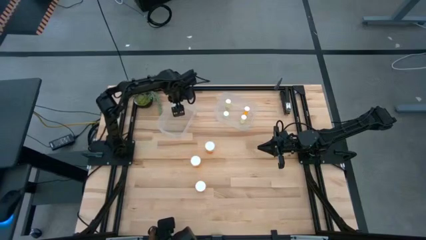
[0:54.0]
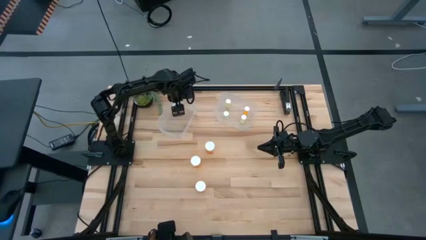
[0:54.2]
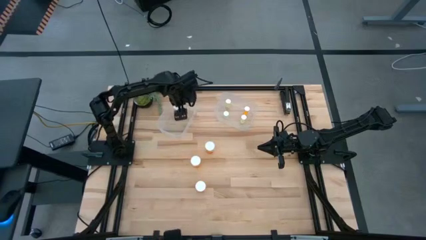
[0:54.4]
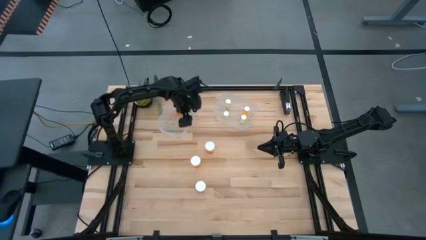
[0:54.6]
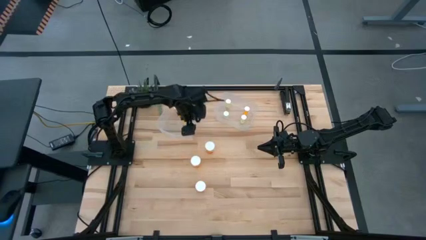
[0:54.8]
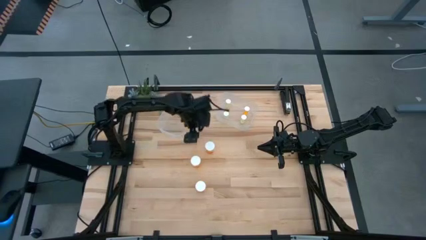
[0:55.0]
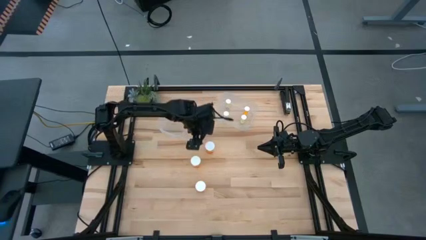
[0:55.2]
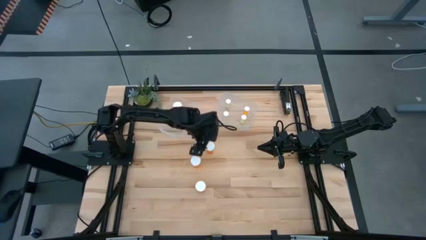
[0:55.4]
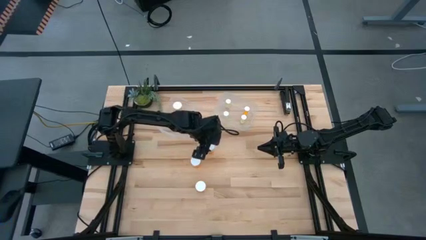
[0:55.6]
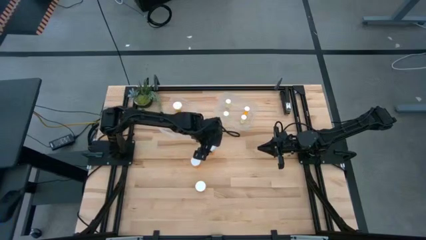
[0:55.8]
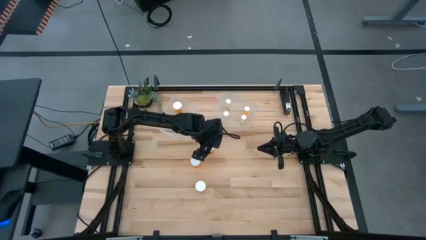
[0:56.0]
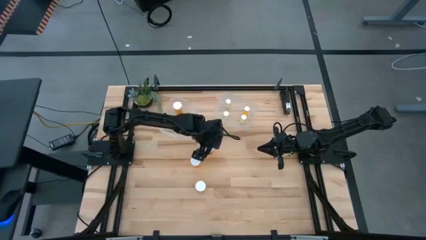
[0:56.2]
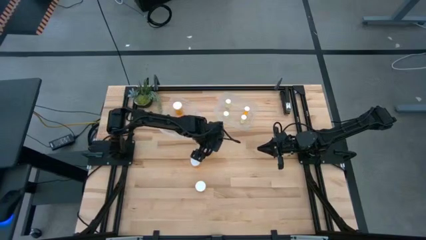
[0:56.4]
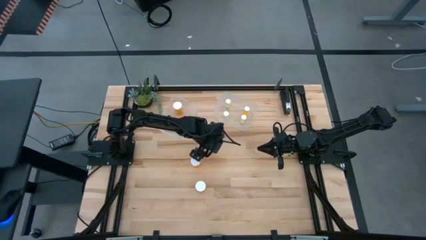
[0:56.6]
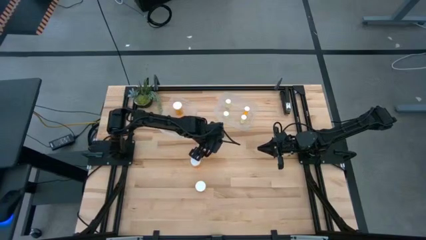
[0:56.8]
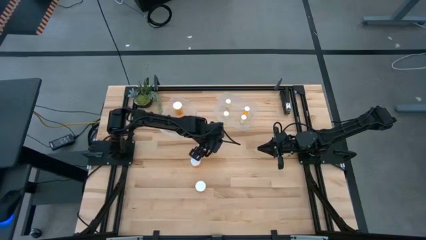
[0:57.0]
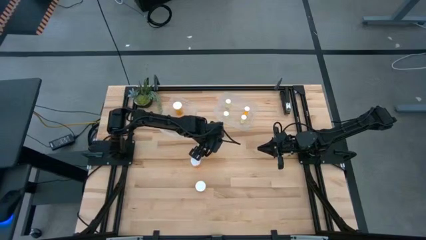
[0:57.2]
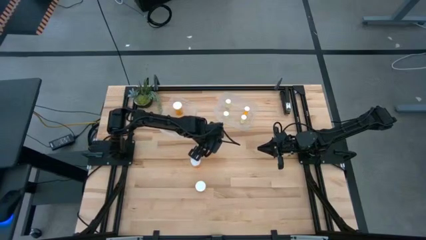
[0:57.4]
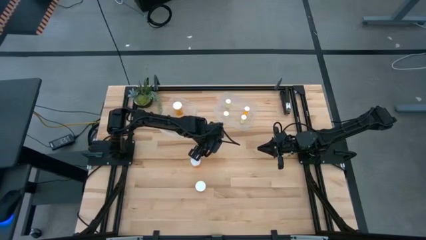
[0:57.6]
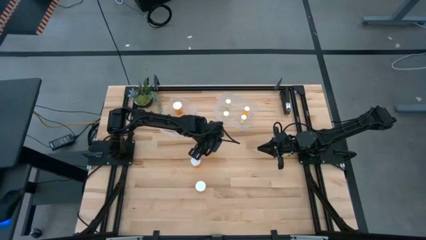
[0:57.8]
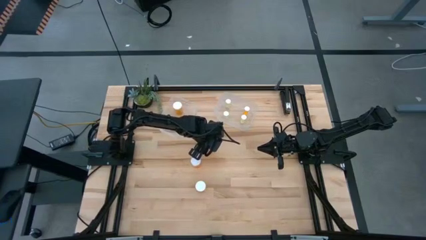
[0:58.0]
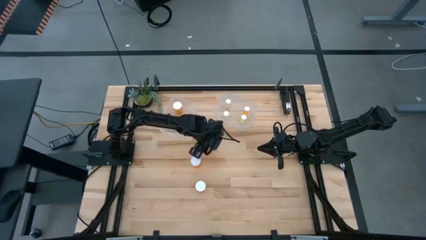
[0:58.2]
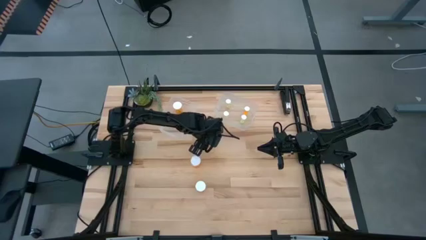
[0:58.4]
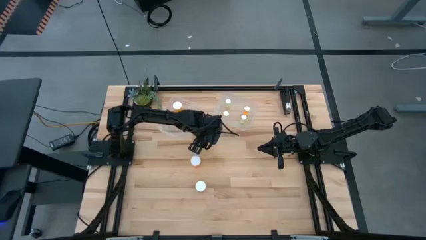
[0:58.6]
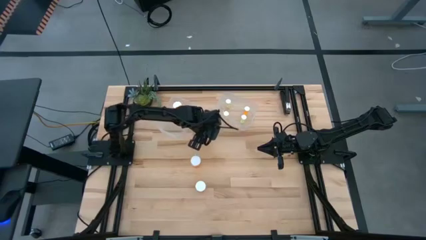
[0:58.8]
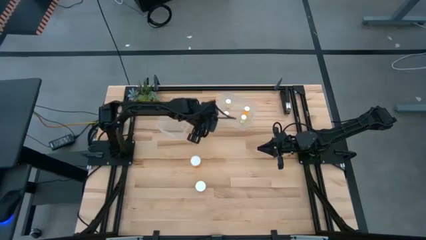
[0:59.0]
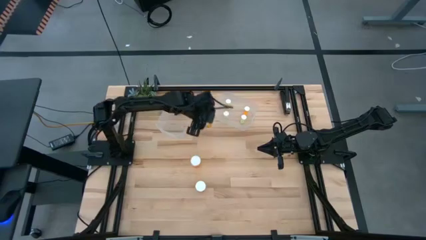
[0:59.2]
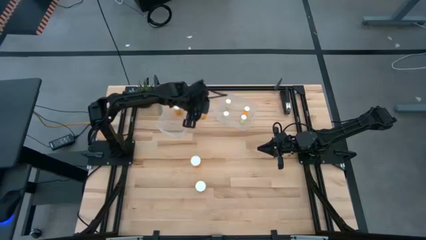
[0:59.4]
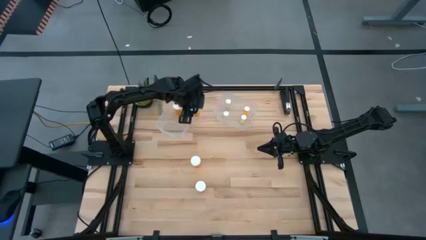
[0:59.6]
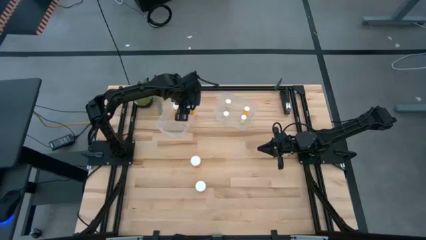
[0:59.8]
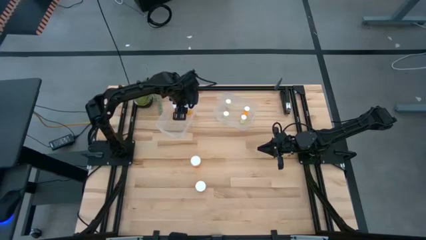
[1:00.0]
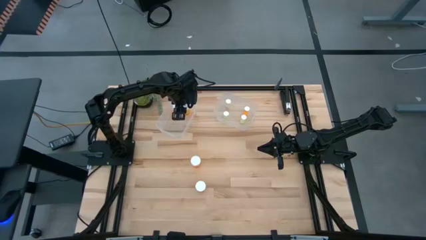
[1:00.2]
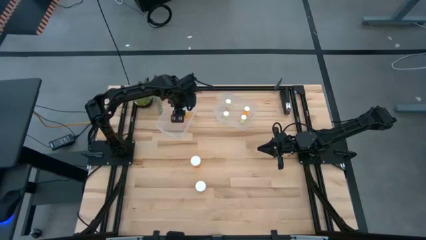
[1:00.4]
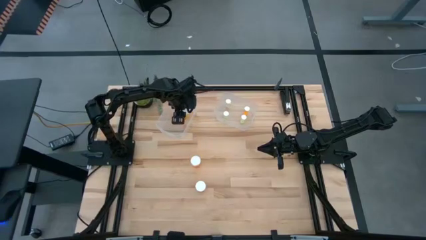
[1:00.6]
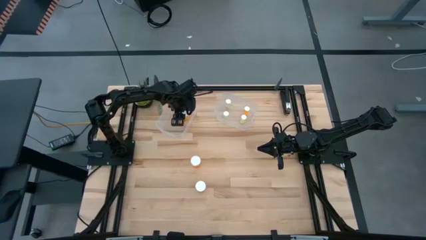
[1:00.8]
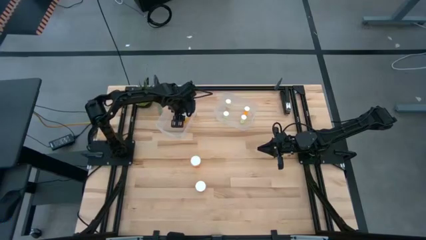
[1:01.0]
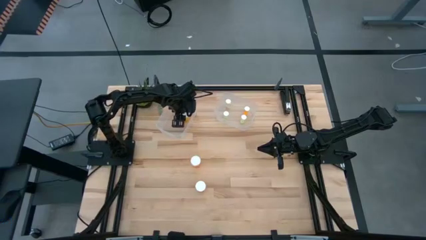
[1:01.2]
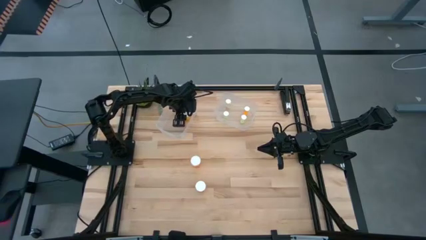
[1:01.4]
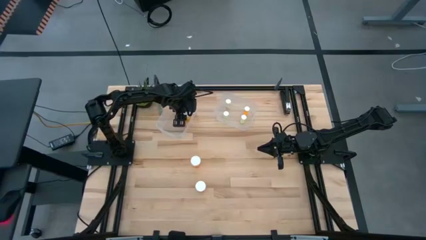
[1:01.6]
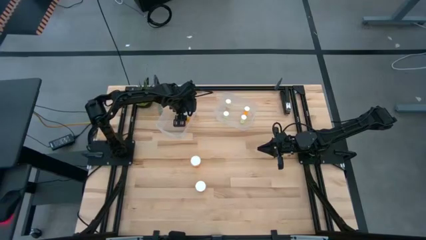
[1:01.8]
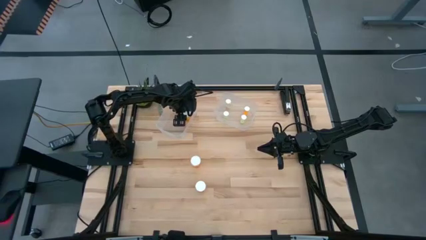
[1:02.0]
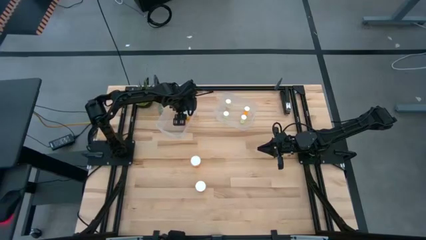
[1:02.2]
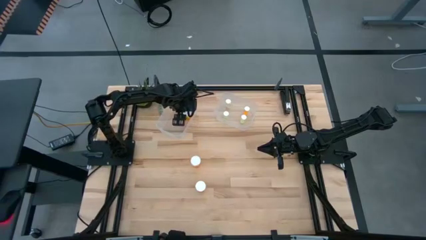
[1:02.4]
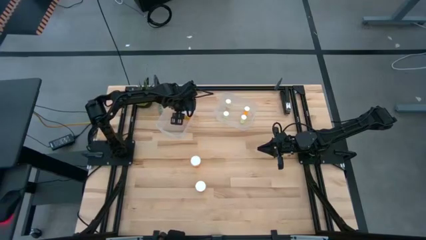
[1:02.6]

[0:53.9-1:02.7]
Task: Pick and place medicine bottles into bin by pill shape (circle, oval)
Put the large orange pill bottle into the left transparent bin

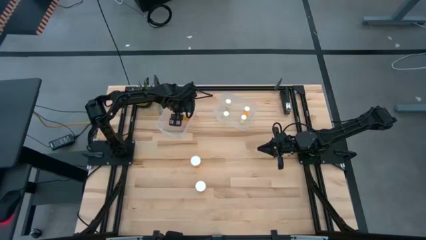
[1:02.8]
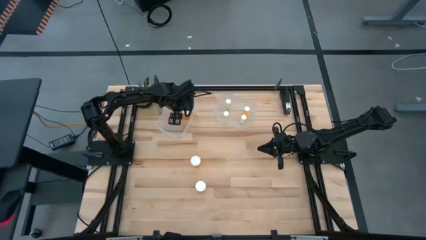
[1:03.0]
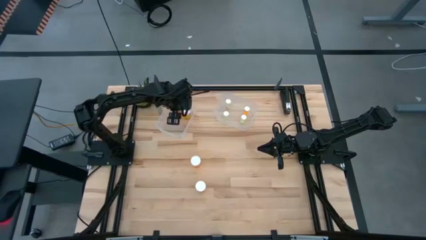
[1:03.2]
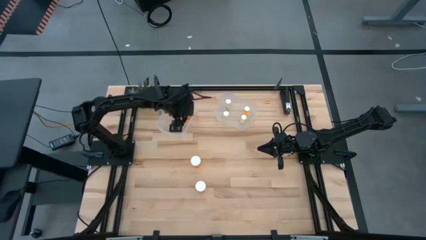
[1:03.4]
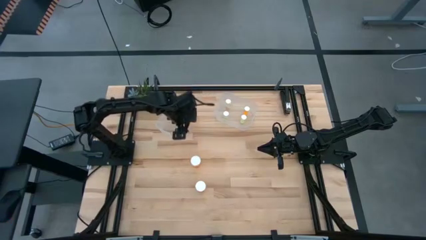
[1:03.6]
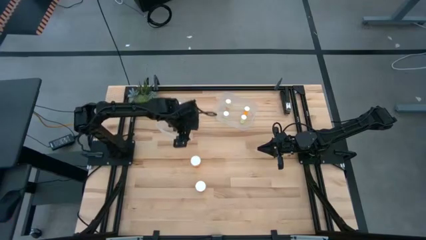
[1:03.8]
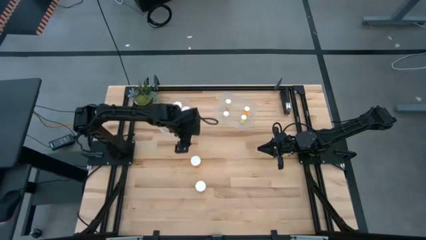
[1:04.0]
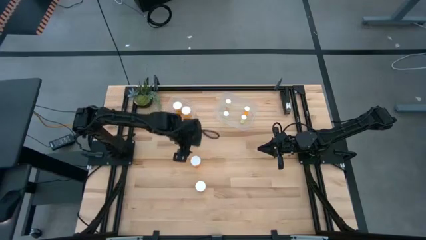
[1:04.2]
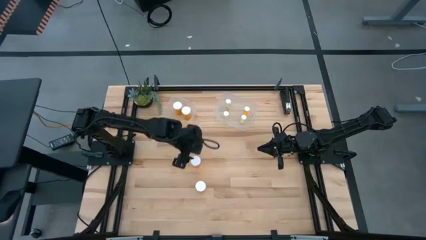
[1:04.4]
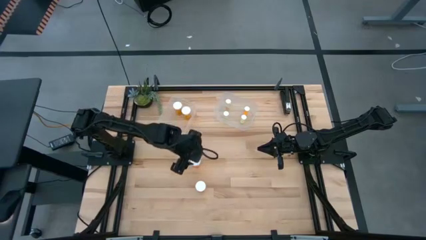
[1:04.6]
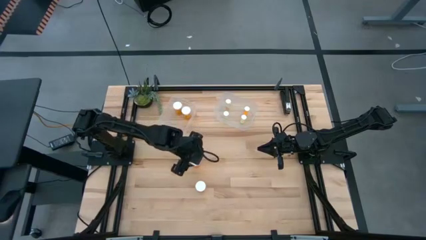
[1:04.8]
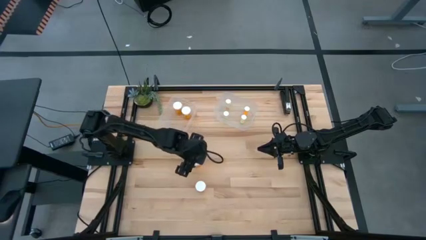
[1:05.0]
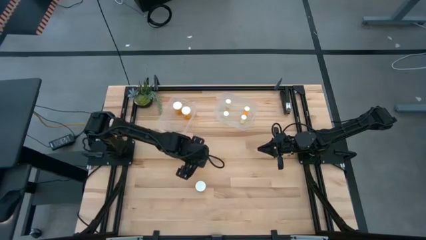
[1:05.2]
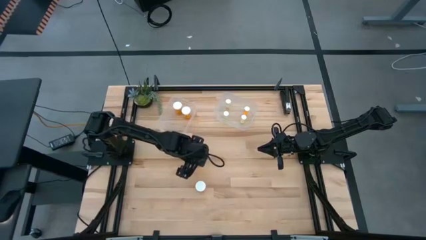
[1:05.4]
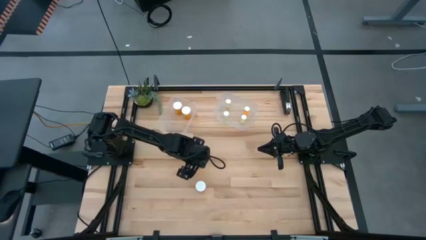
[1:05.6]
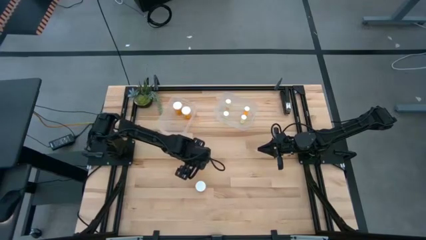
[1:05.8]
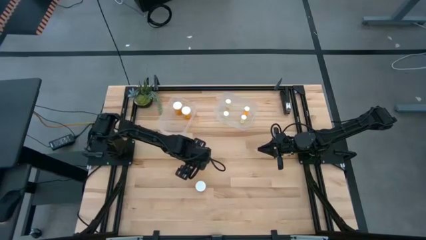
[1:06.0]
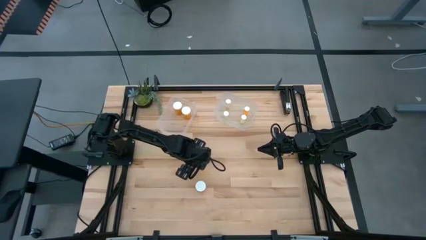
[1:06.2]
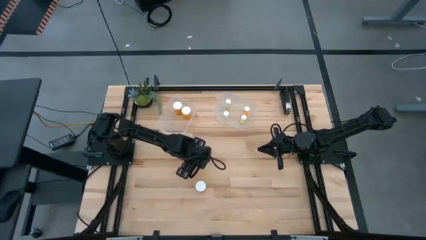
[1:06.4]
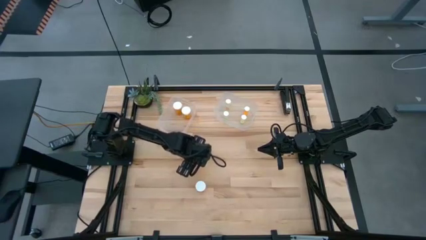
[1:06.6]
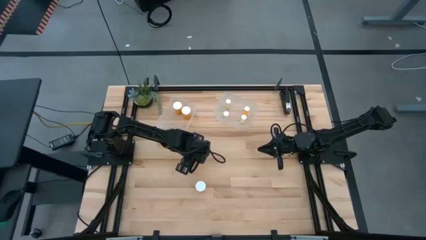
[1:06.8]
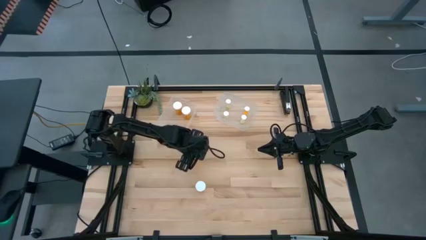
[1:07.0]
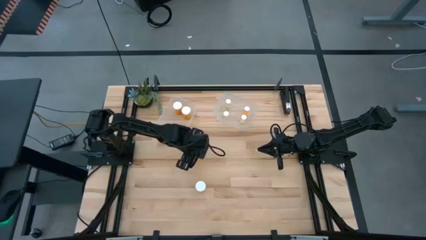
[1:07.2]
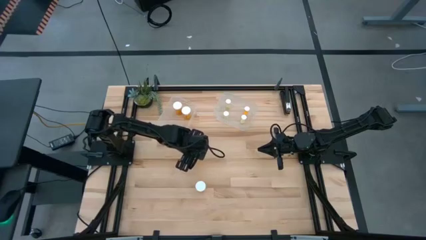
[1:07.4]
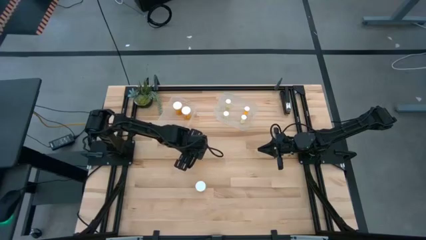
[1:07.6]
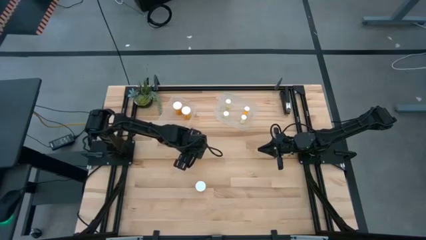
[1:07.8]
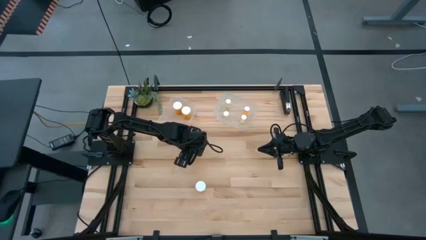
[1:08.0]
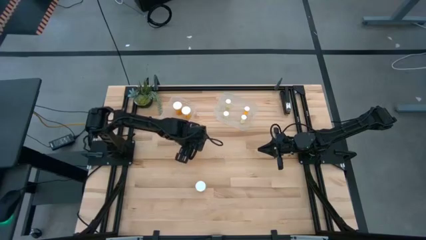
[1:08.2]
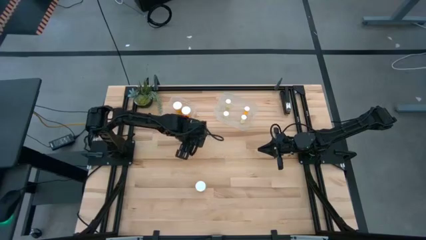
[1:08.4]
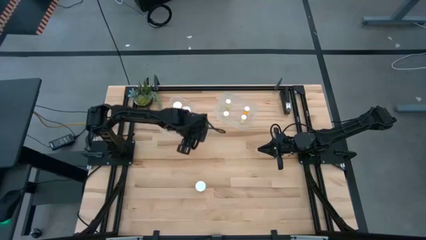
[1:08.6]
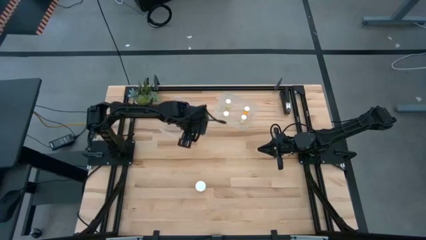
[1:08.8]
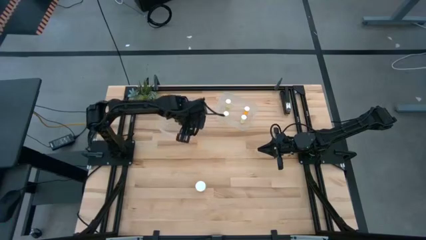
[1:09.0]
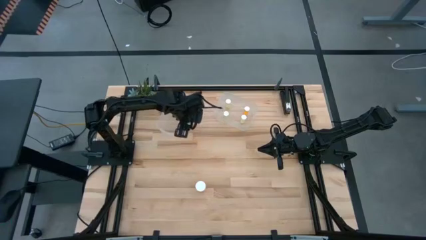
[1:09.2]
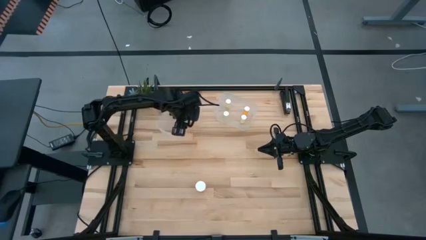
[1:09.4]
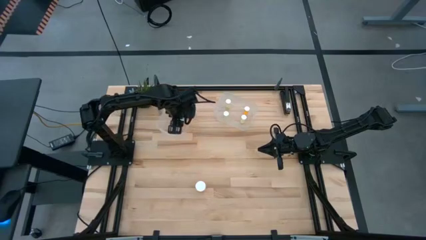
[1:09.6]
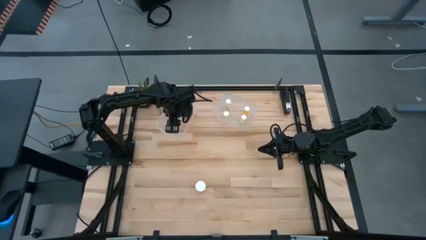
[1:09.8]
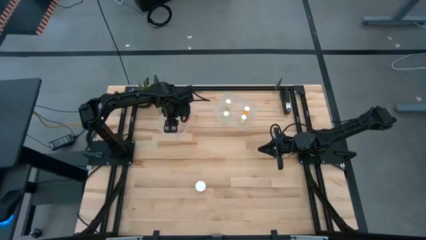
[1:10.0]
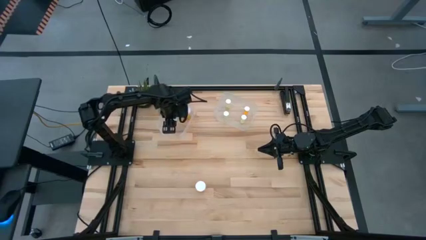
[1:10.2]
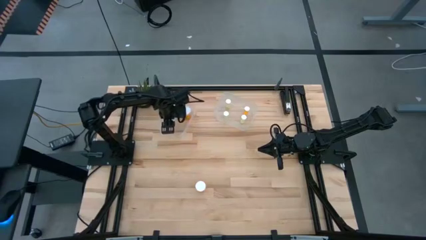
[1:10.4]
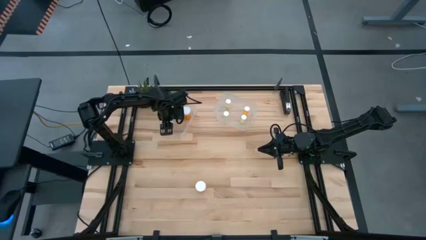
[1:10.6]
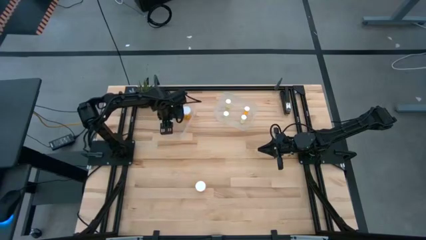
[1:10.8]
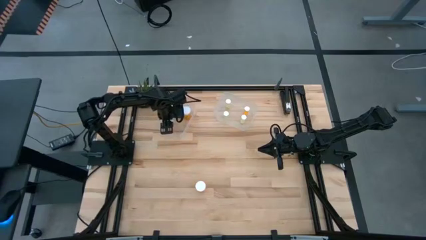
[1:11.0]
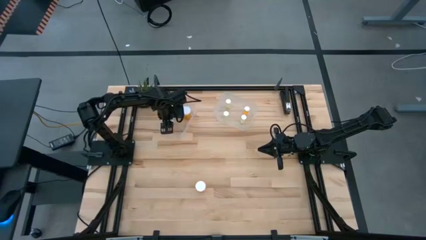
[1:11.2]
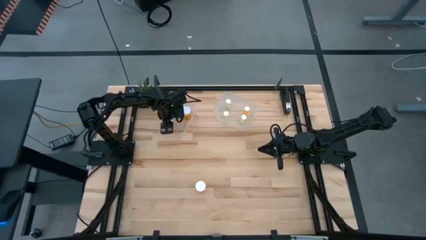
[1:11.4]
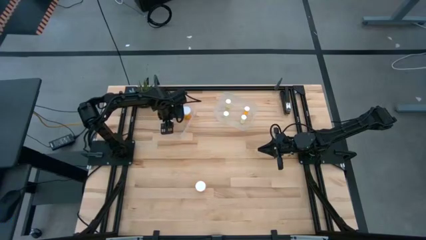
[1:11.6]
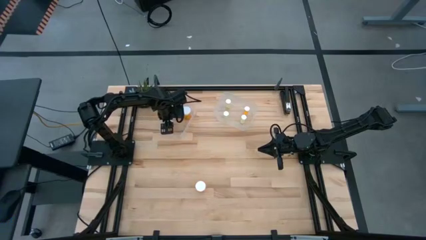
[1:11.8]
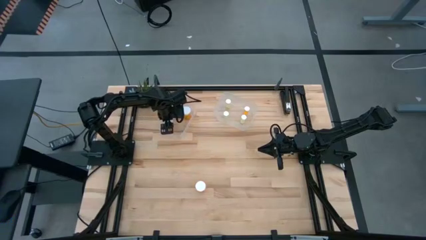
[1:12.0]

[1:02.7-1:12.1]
Put the large orange pill bottle into the left transparent bin
